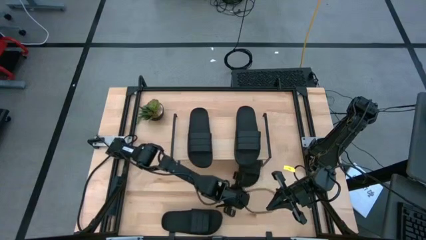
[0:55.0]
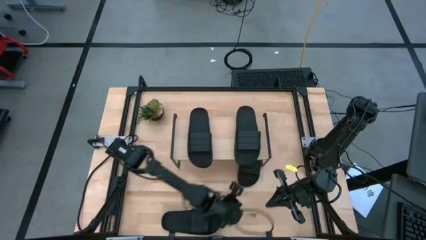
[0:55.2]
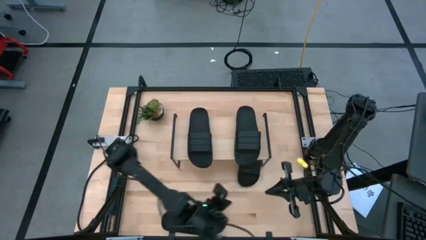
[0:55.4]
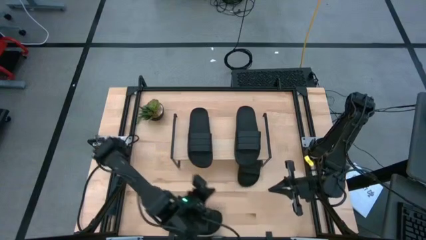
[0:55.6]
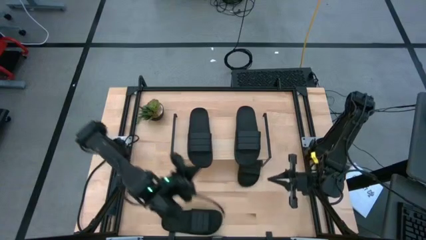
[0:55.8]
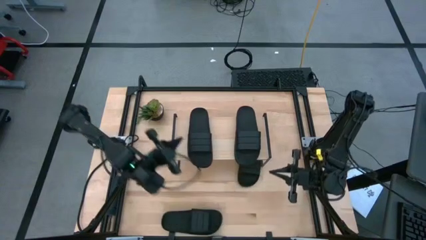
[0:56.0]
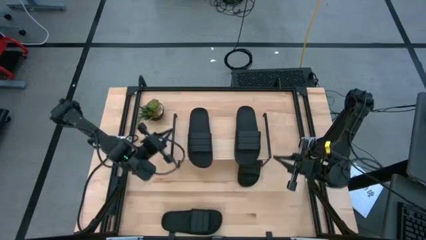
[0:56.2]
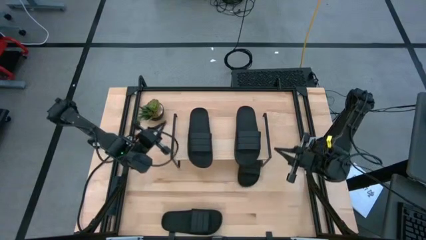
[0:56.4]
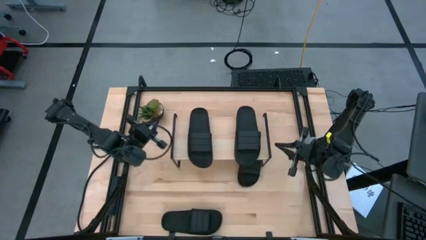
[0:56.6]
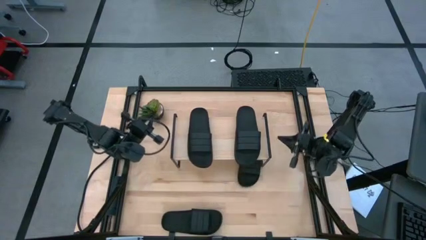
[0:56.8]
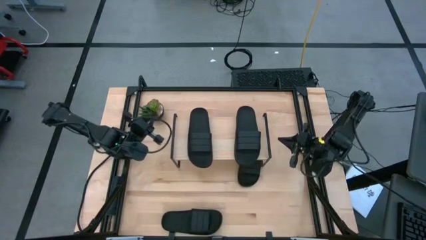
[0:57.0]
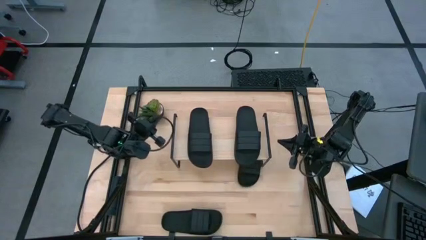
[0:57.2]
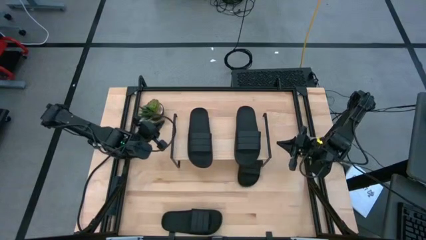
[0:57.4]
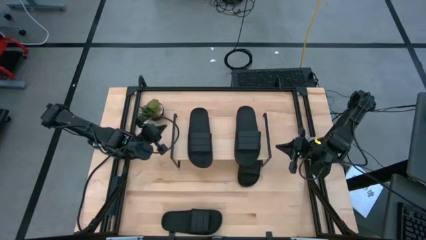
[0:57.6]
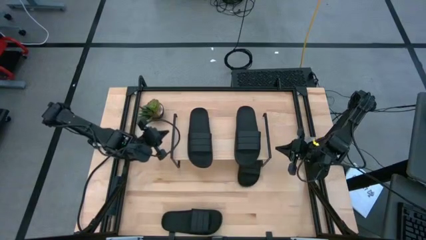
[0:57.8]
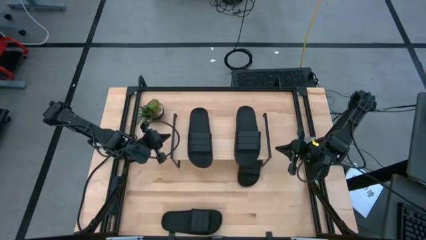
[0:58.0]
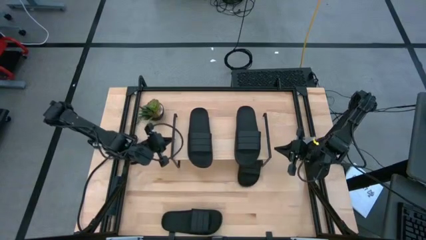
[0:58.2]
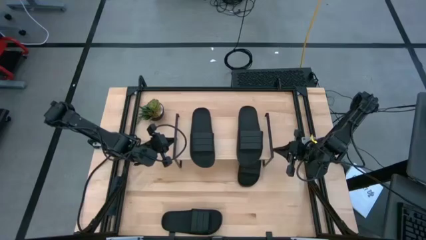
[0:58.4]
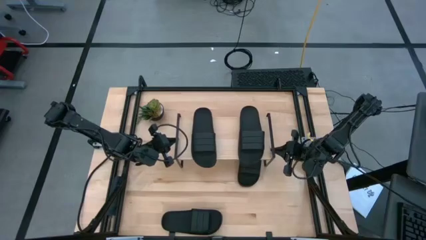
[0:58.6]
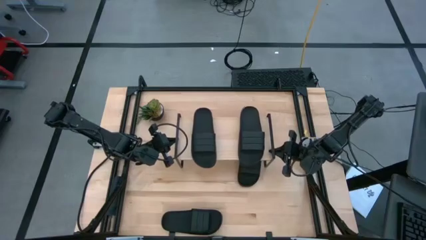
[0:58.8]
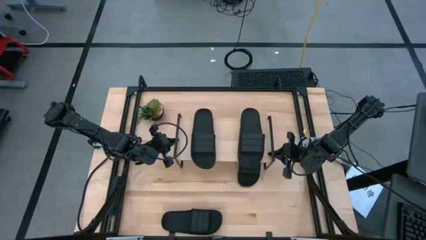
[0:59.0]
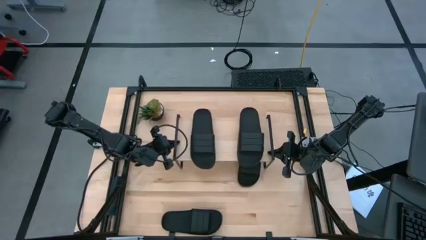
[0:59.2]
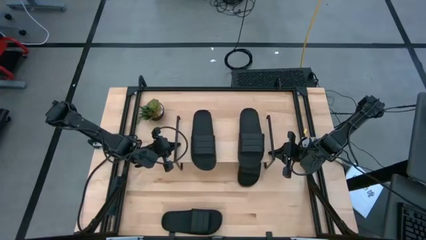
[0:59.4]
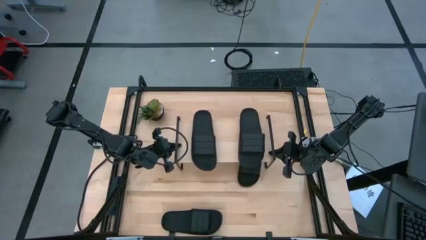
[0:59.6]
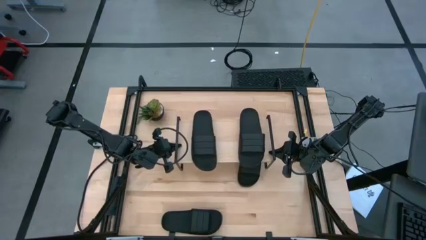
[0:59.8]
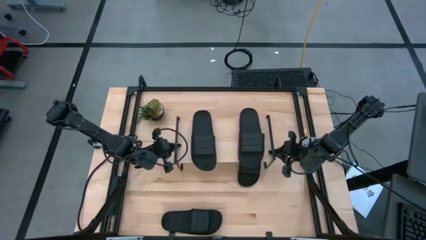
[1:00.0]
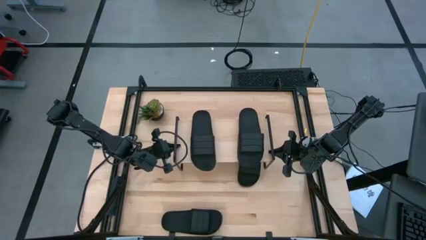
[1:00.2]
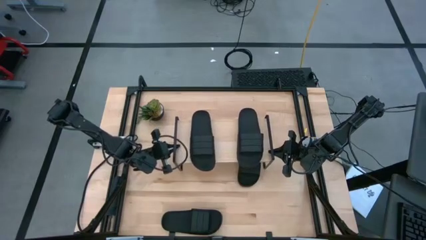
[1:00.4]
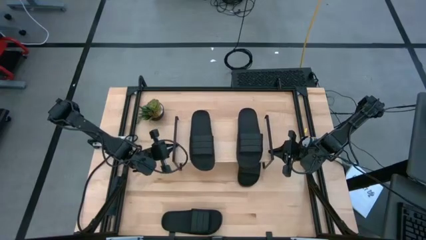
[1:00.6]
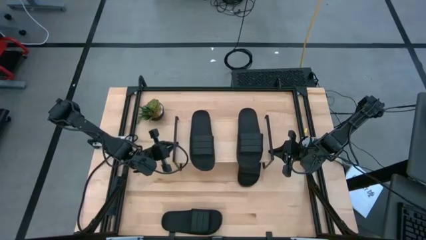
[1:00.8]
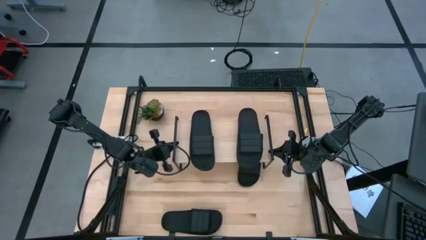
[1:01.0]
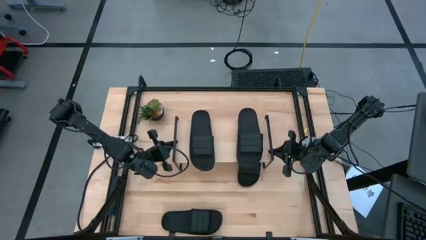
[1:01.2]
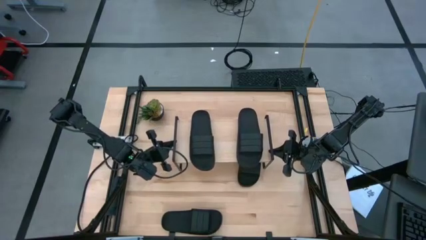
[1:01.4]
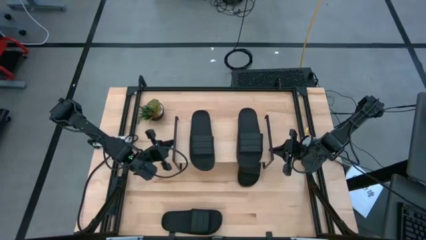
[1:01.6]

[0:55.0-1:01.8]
Task: Pick and place slides into the shelf
Adjust the shelf

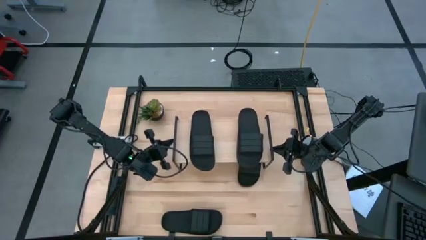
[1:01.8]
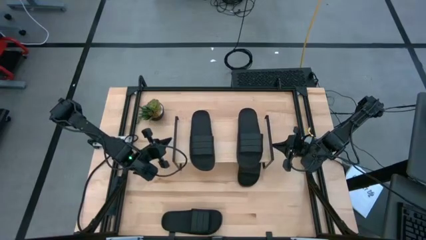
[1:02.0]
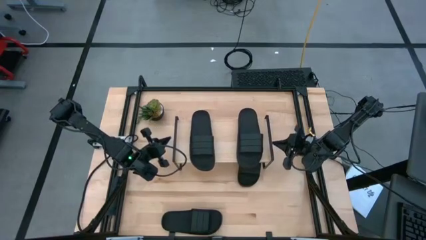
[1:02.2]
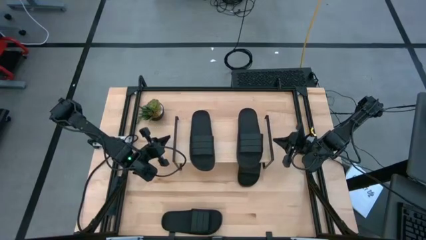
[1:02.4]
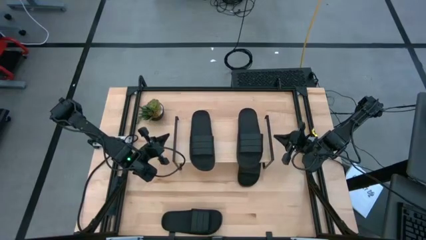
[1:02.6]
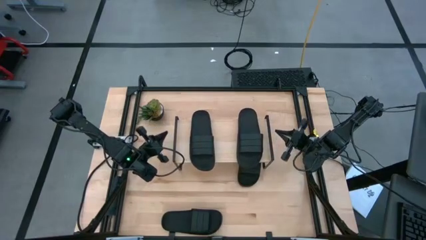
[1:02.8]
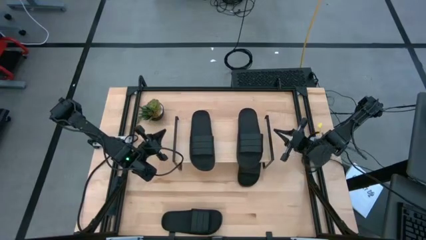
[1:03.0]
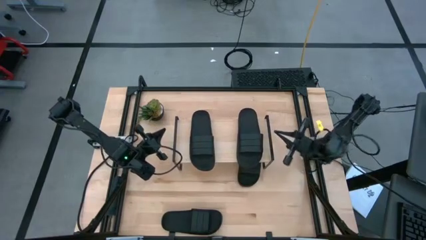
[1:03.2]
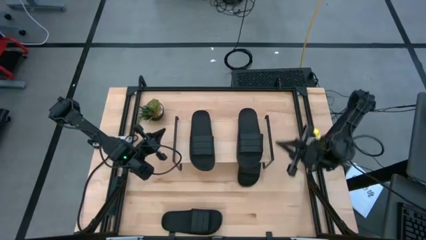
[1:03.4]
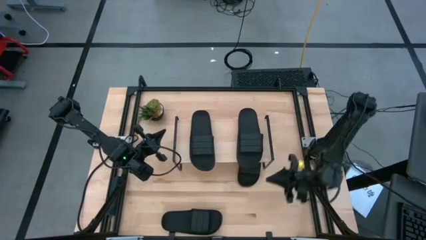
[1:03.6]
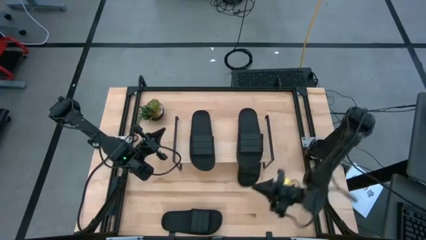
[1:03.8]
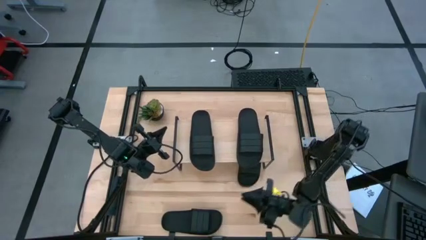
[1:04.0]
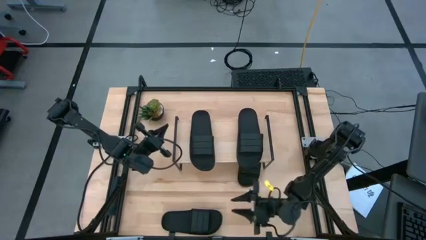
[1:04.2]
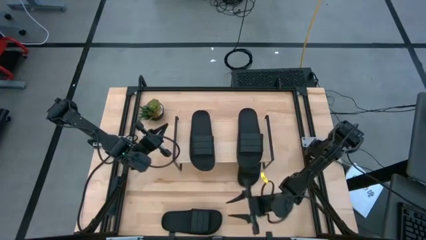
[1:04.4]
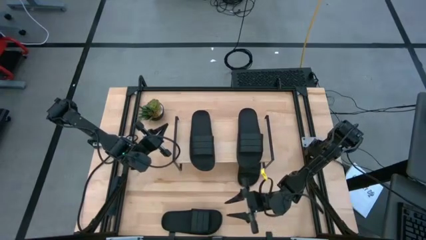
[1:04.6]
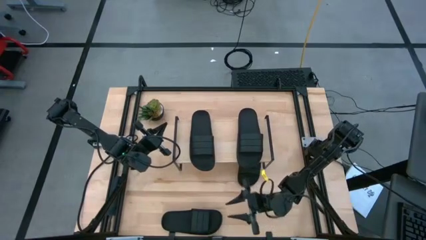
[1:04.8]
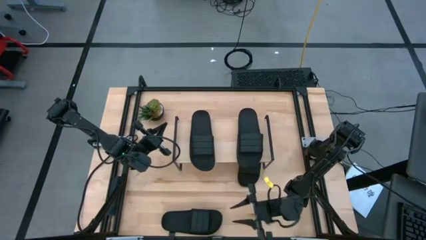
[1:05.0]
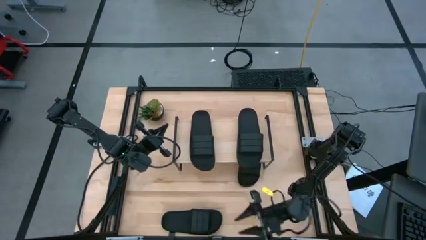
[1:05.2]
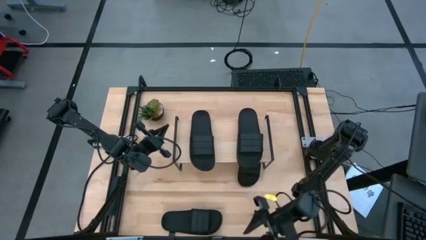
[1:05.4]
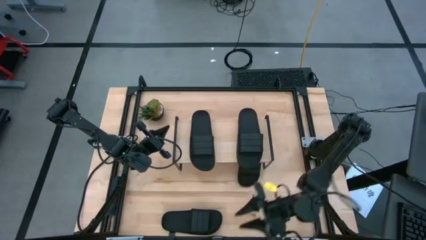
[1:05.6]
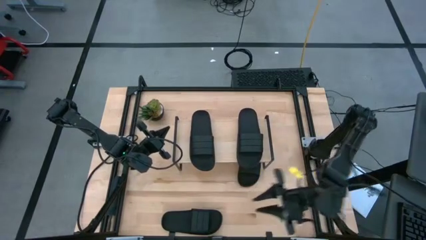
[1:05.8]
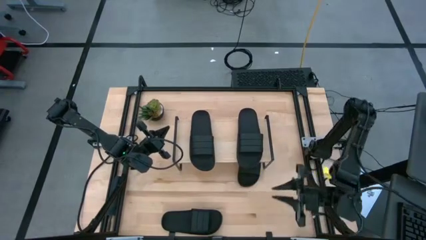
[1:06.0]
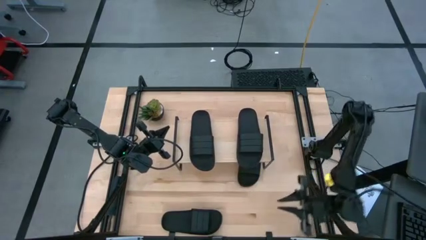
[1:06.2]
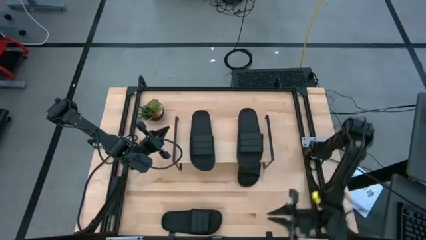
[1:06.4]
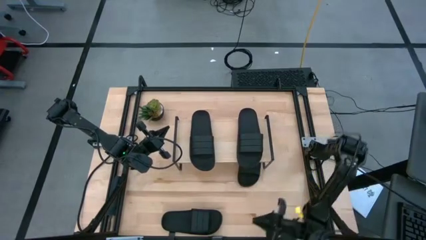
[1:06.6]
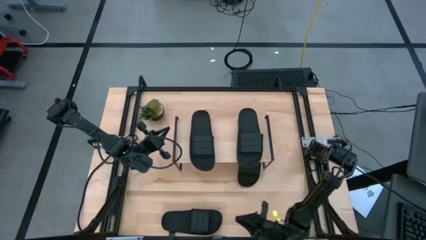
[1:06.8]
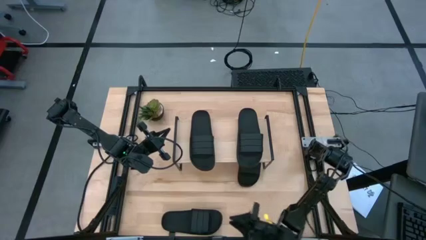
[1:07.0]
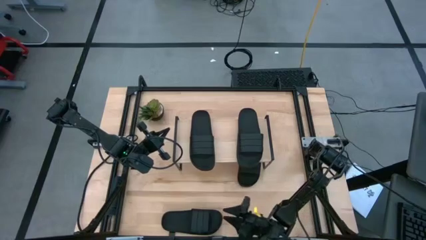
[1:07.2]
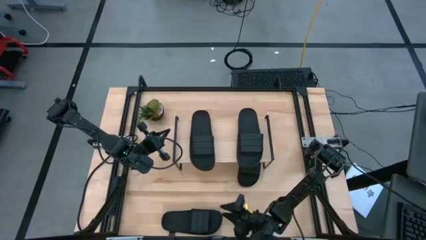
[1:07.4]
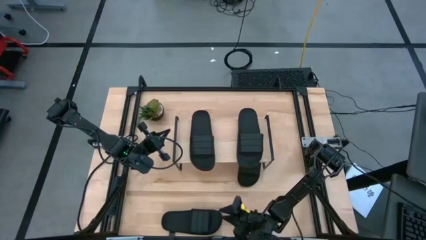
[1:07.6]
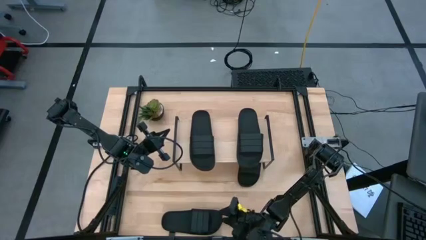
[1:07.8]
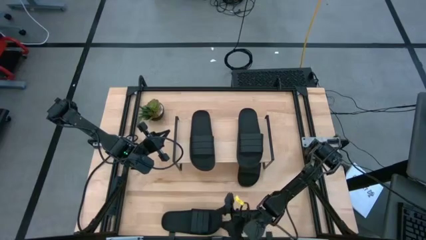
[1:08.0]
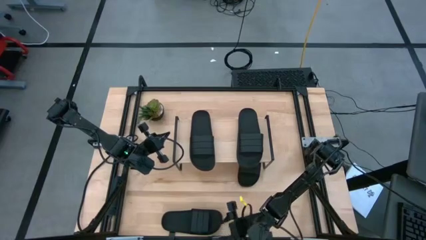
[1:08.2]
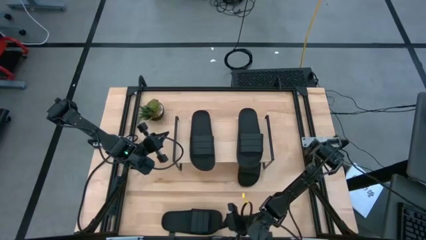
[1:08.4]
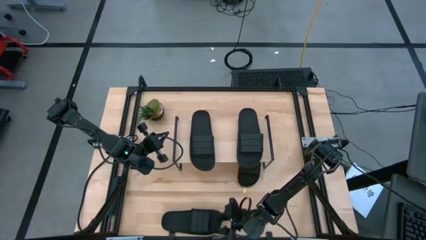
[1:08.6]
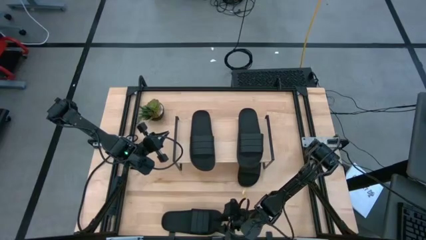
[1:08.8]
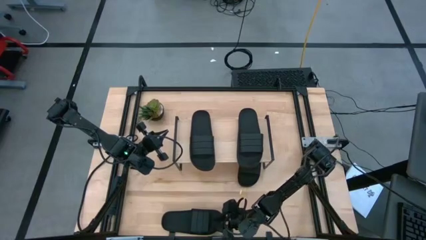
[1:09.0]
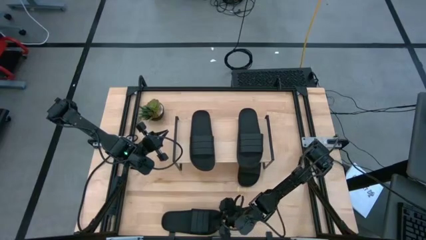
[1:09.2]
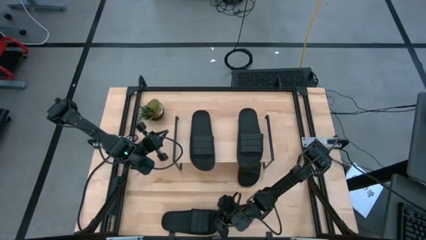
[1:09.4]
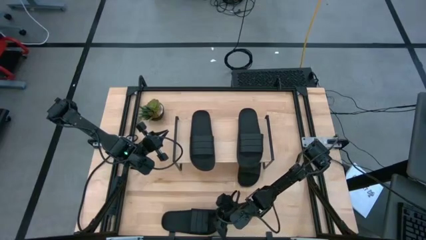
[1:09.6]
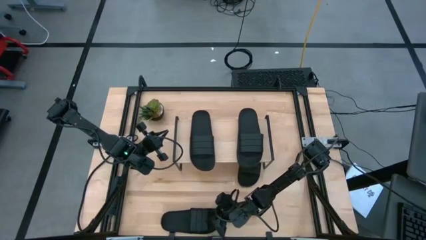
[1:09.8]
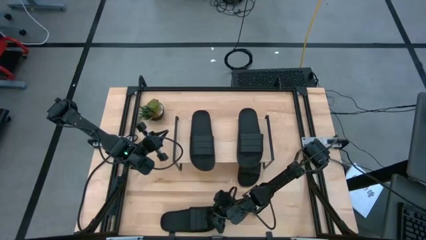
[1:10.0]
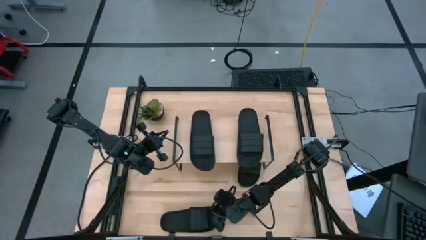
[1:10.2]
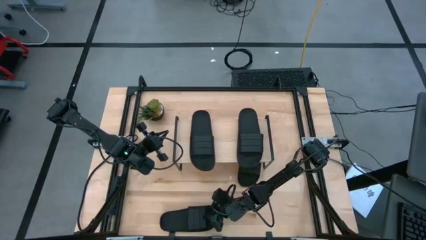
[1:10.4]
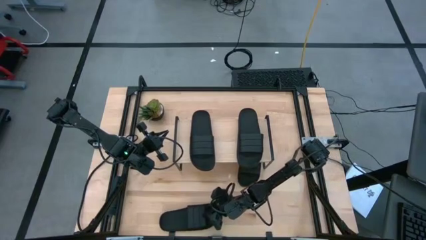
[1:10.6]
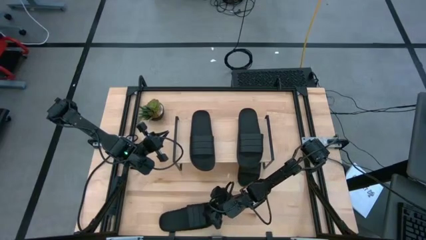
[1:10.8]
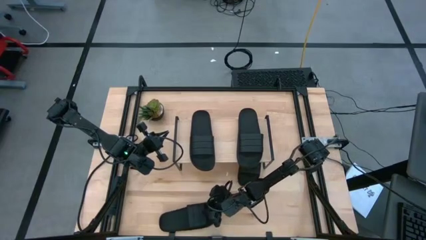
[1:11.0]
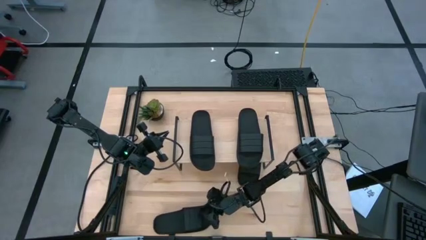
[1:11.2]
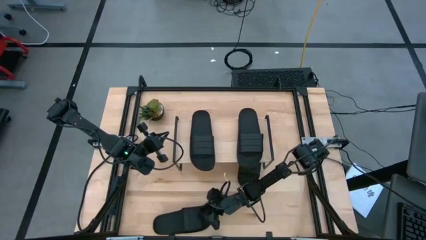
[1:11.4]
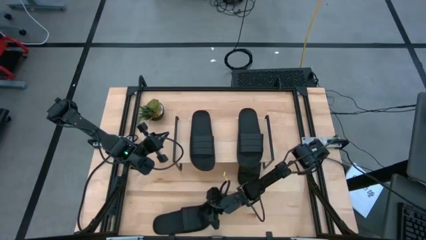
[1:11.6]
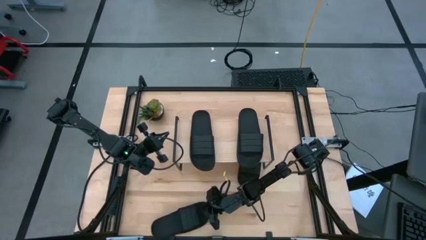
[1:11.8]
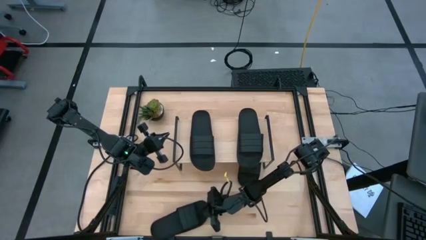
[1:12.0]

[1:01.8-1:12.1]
Put the left black slide under the shelf
